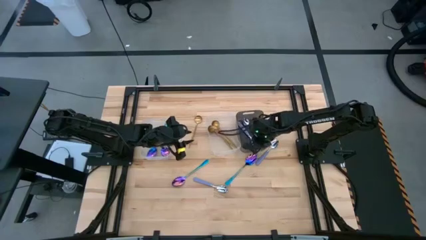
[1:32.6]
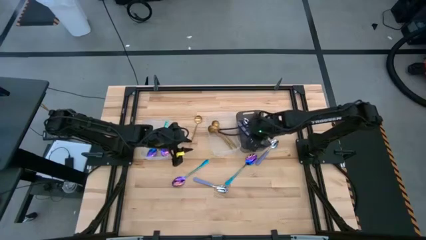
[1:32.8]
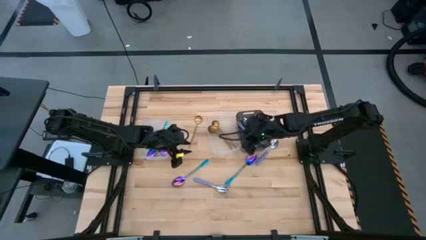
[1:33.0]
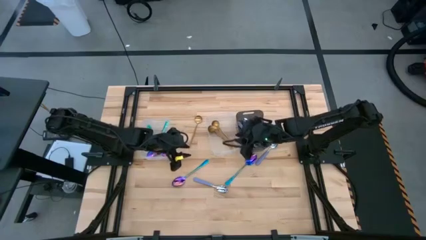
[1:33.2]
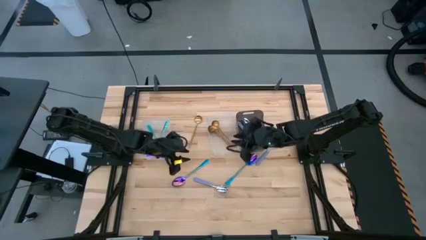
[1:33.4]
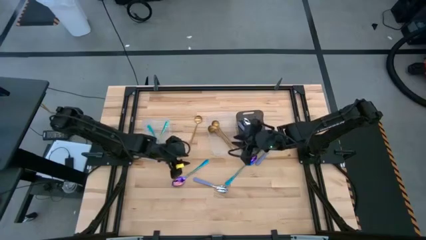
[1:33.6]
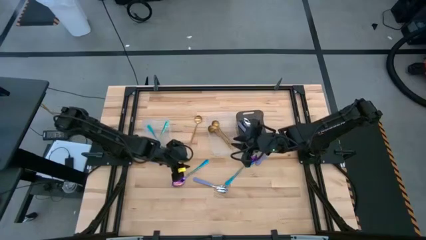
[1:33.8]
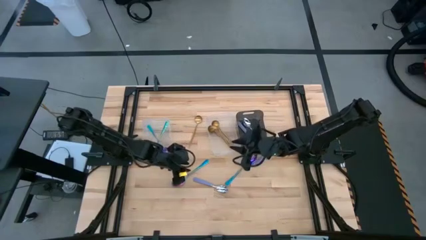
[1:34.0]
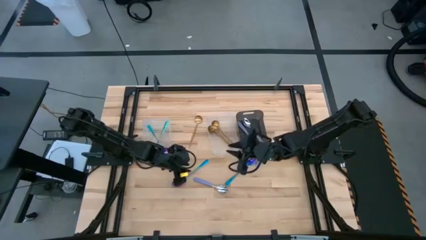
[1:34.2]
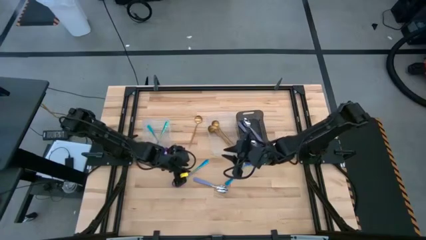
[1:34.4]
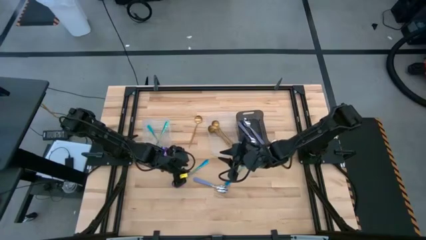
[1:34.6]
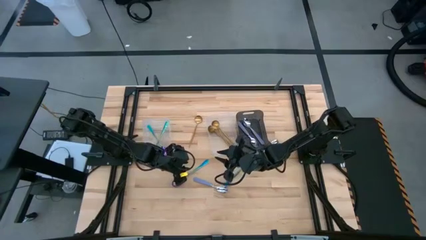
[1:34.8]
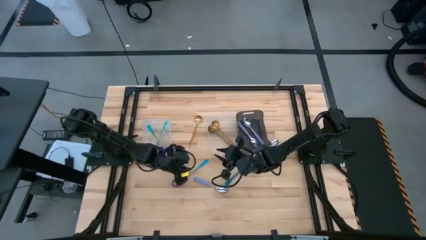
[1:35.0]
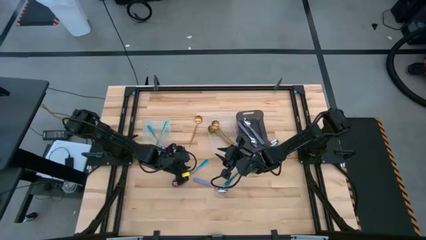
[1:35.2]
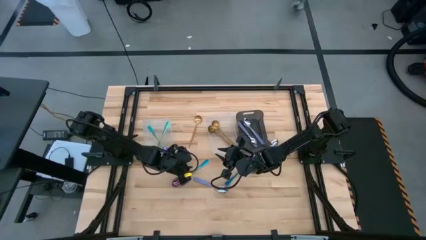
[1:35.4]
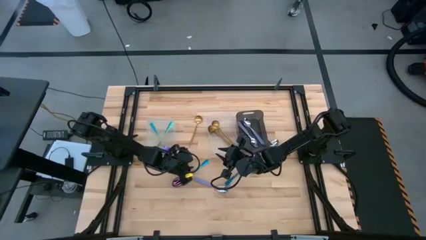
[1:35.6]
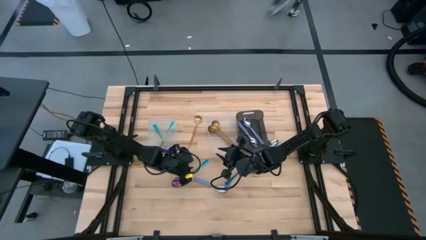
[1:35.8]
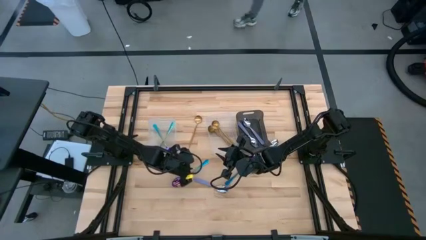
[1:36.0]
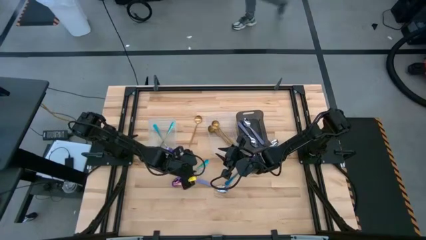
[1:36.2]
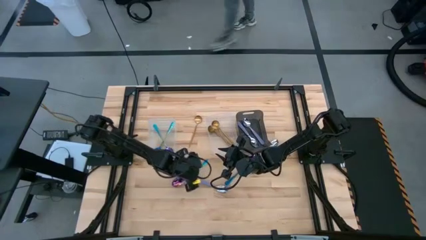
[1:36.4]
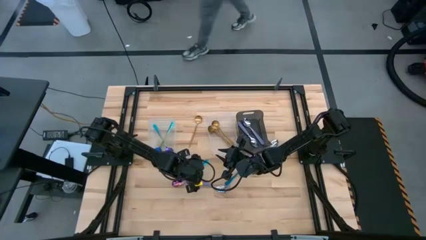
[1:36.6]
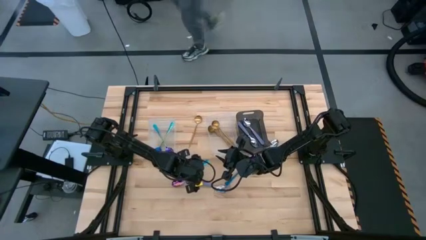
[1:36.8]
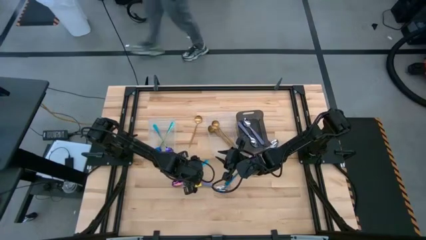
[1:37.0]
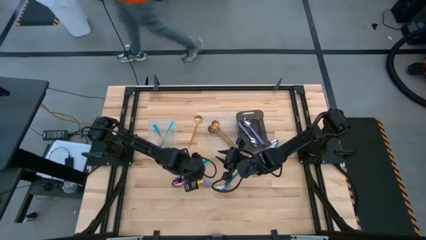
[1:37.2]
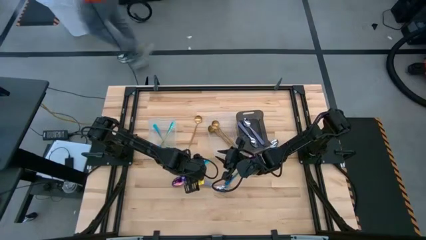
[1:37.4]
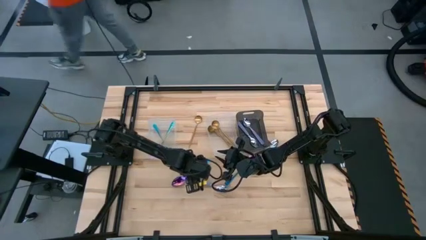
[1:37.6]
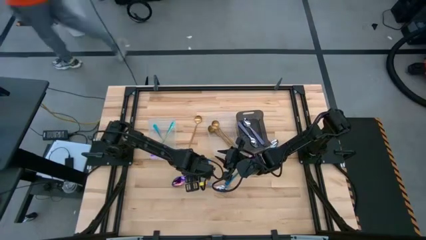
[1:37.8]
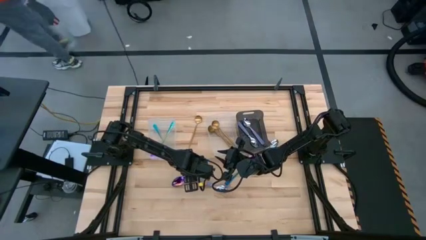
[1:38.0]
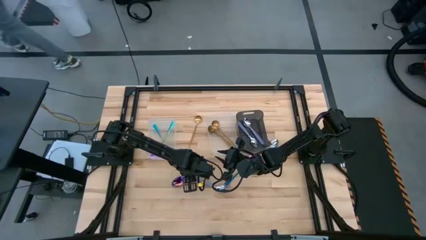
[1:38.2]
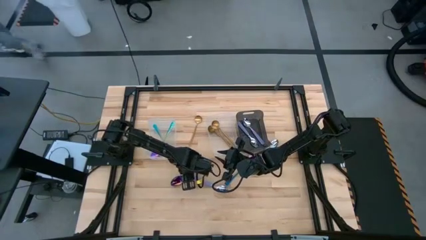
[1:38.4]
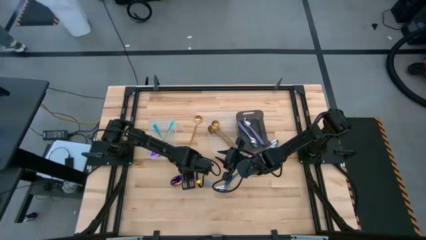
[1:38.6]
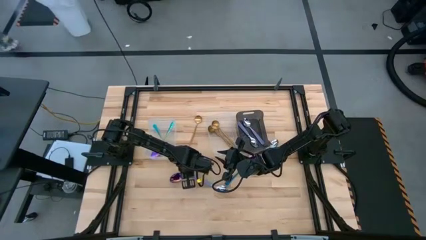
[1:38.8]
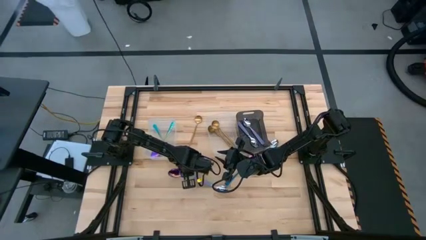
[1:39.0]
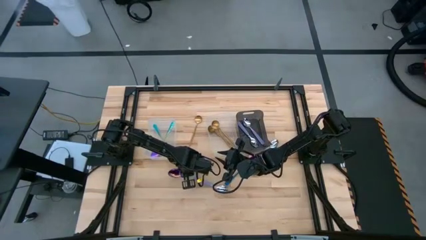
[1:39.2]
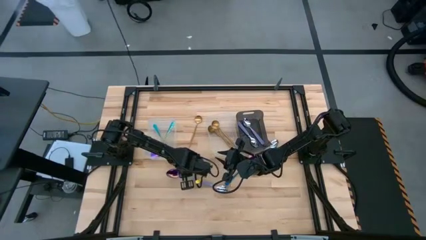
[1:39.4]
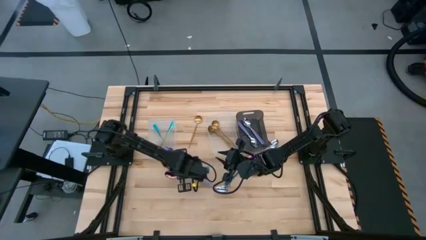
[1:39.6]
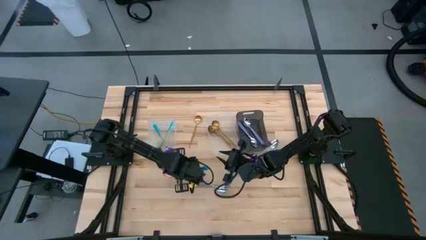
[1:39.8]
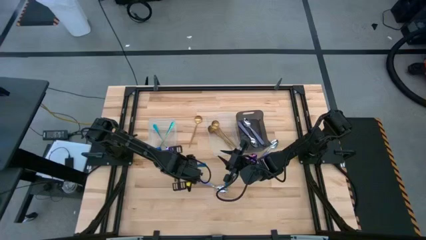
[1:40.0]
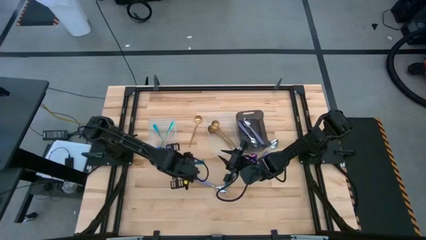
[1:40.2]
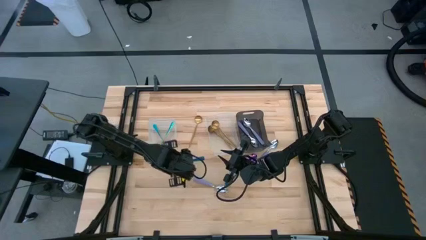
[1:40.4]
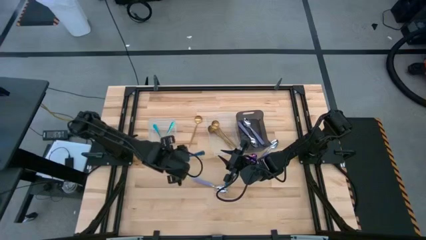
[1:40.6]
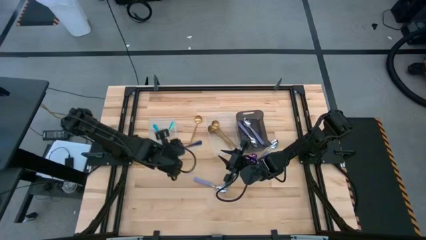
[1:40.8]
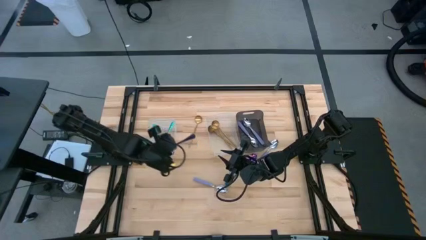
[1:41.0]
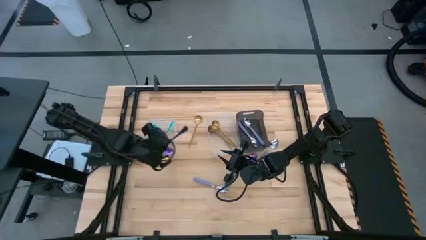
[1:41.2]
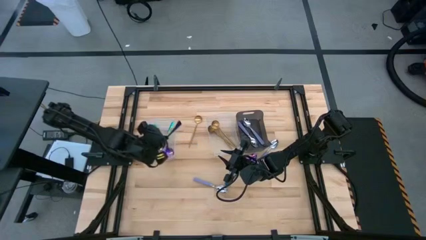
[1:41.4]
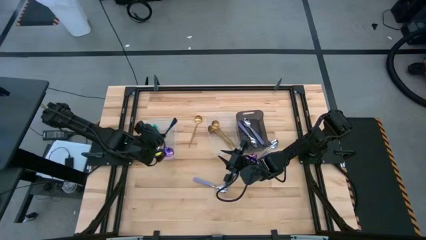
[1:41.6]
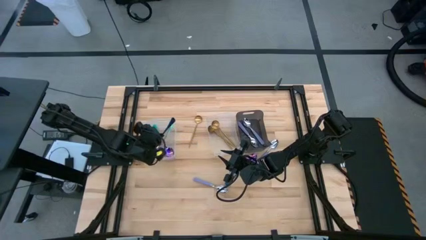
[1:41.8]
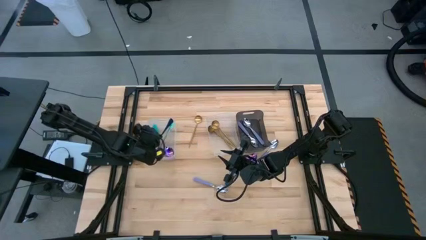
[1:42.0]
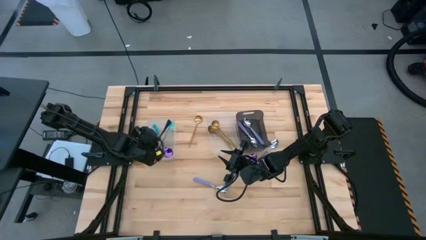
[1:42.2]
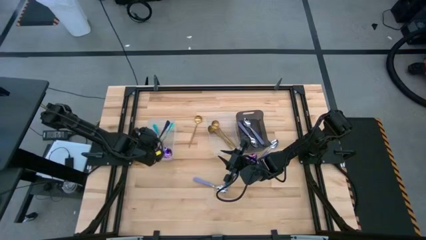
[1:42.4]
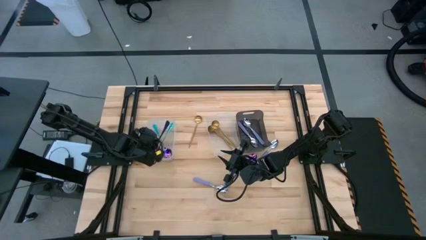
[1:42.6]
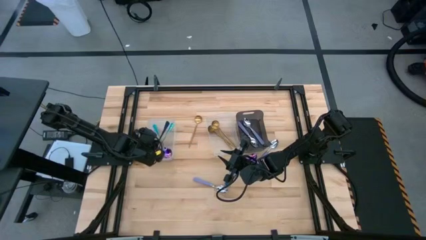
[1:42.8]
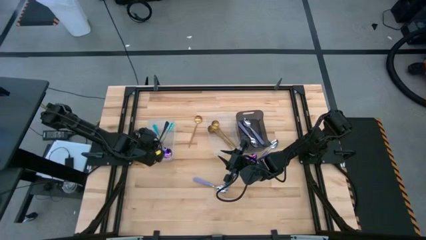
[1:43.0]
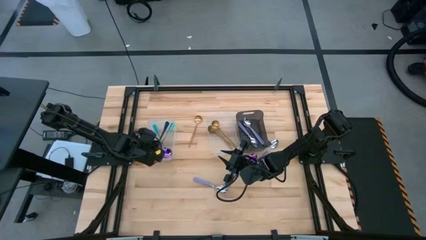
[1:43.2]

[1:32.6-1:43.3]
Task: Sort silverware by color (type)
Put the blue spoon into the left transparent bin

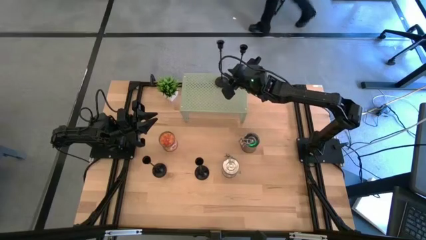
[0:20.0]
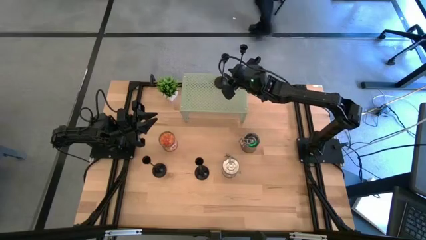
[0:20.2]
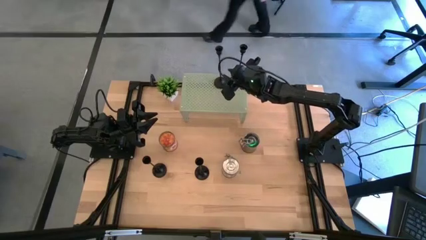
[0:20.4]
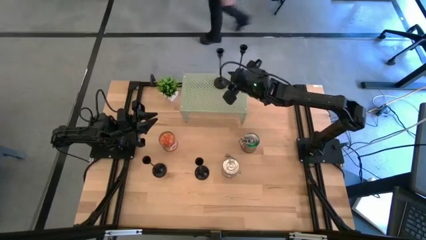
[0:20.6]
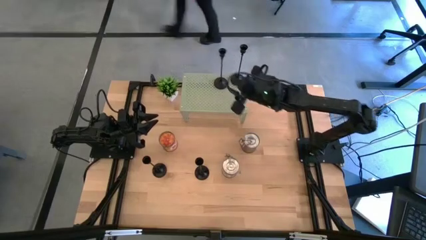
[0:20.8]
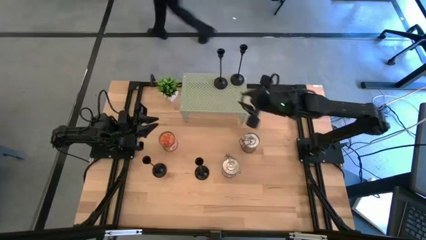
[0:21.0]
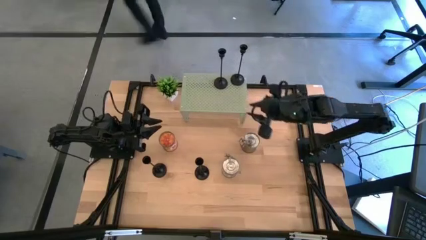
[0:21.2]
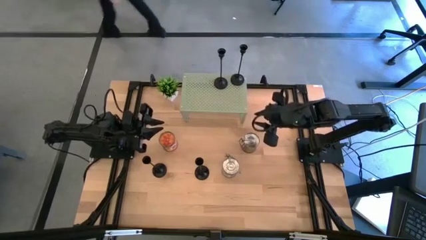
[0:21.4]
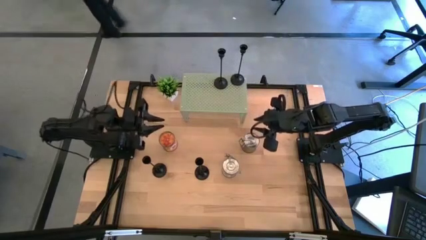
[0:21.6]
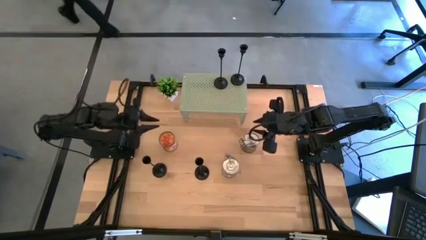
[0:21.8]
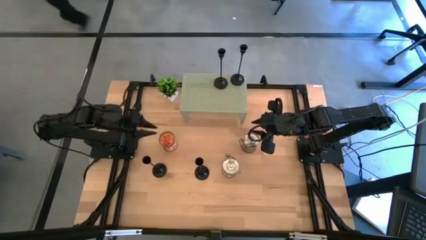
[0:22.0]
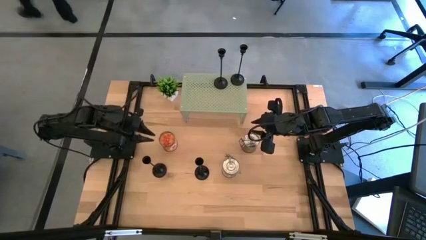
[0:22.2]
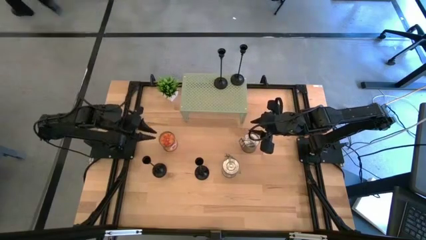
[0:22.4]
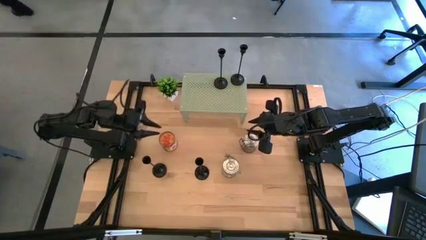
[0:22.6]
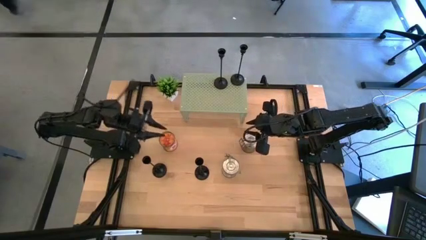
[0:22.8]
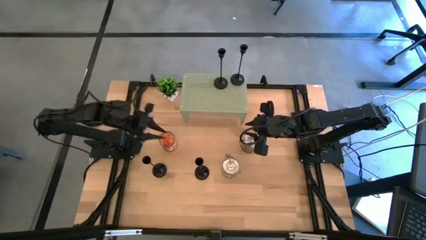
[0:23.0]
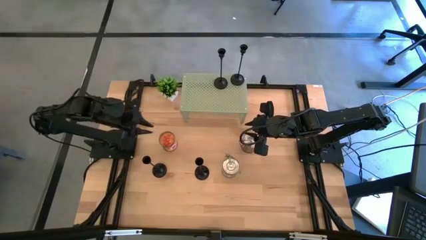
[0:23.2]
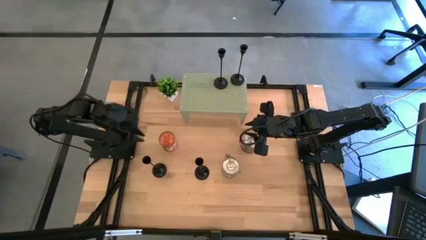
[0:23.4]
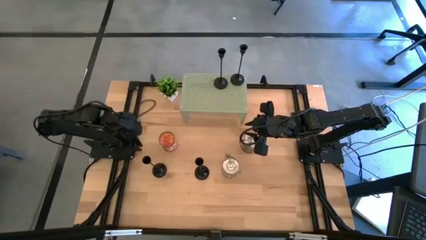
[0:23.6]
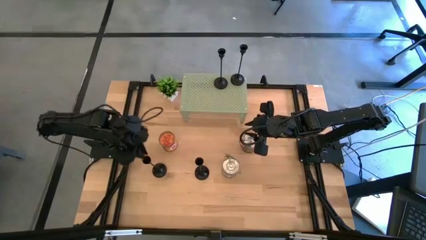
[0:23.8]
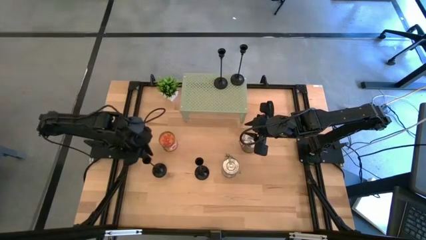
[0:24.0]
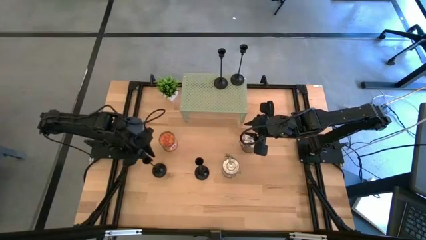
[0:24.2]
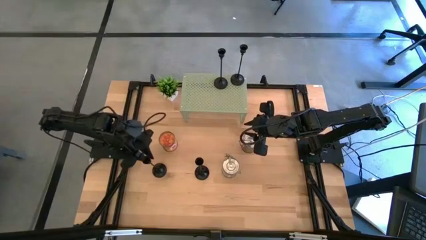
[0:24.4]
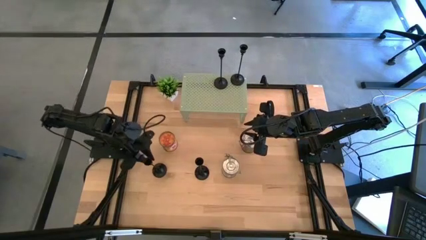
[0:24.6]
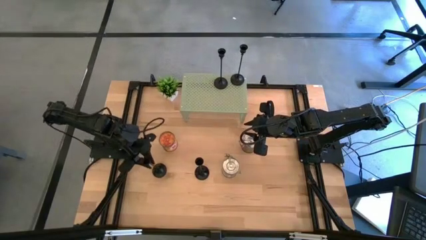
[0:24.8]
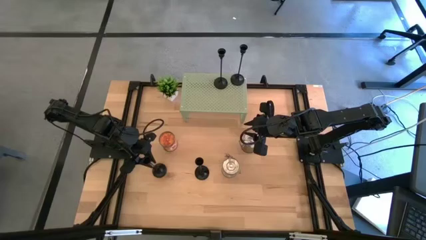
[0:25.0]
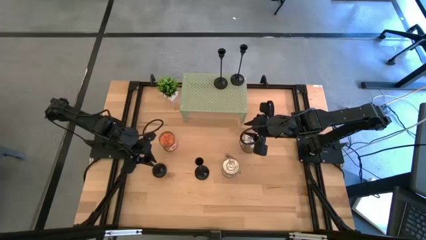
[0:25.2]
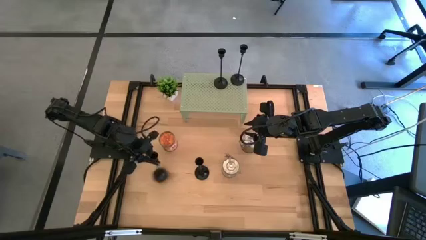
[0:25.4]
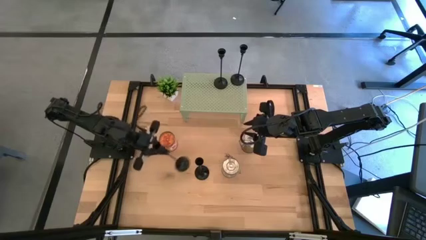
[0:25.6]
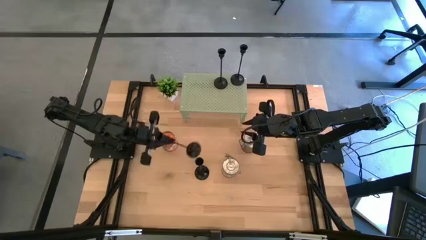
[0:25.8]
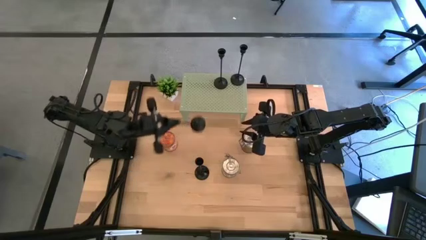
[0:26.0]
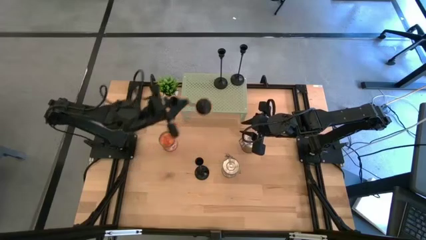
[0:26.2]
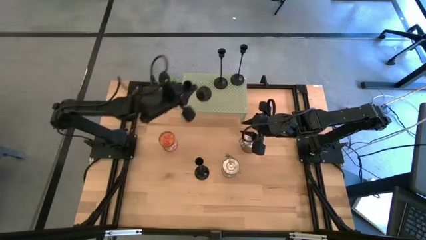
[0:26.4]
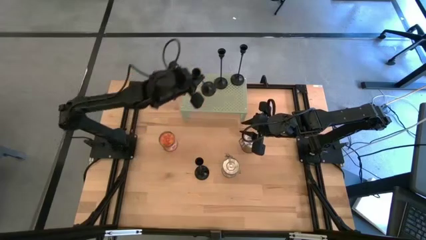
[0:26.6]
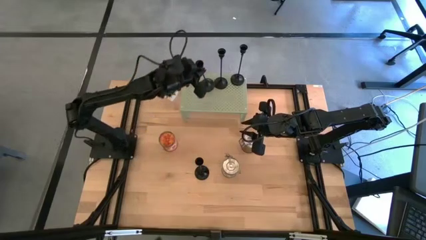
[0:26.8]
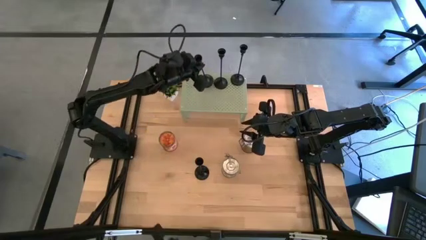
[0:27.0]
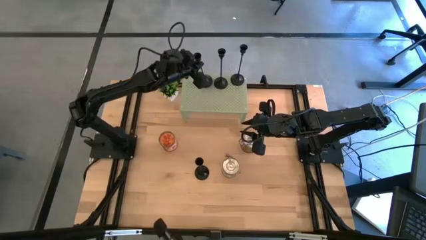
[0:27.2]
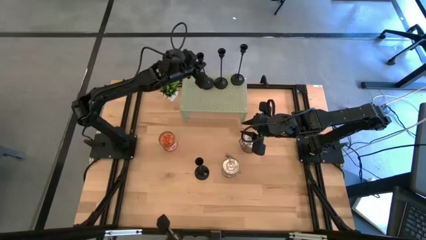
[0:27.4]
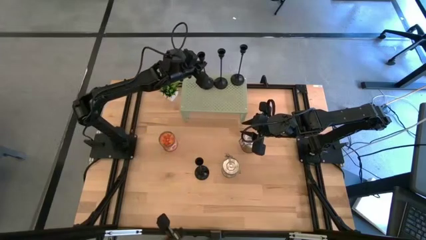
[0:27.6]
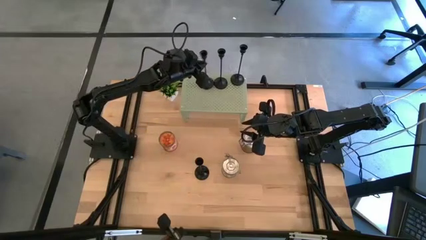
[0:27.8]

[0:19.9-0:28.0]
Task: Pick & Place candle stick holders
Put the black candle holder on the shelf aligned with the other black candle holders
